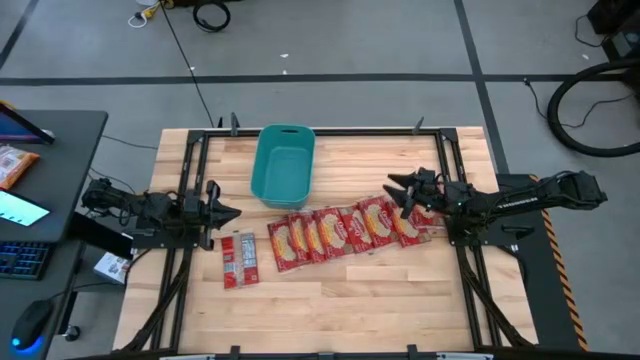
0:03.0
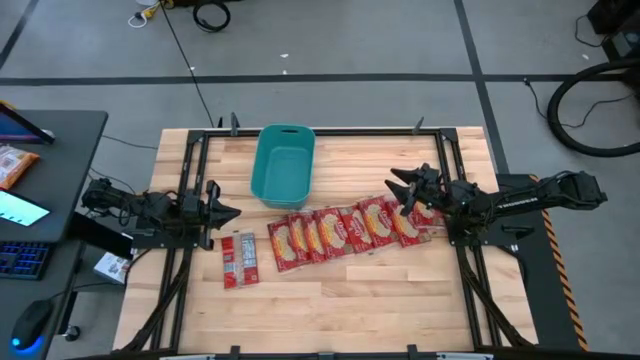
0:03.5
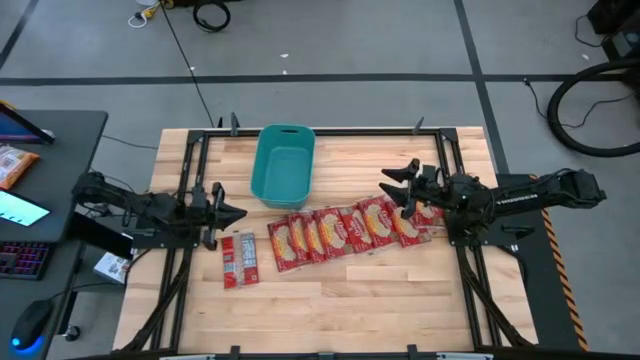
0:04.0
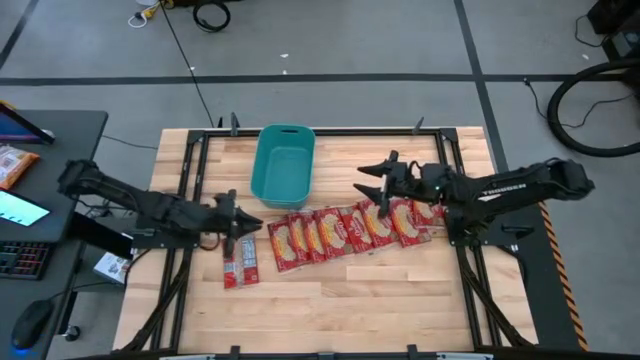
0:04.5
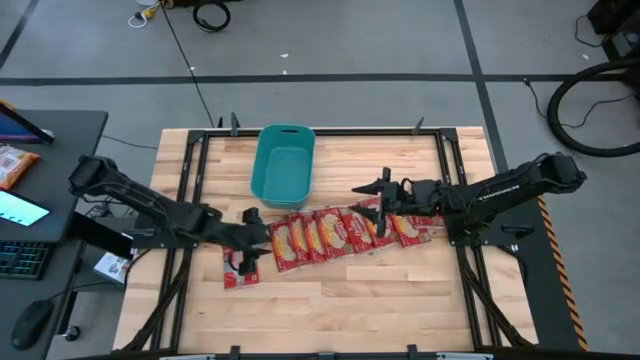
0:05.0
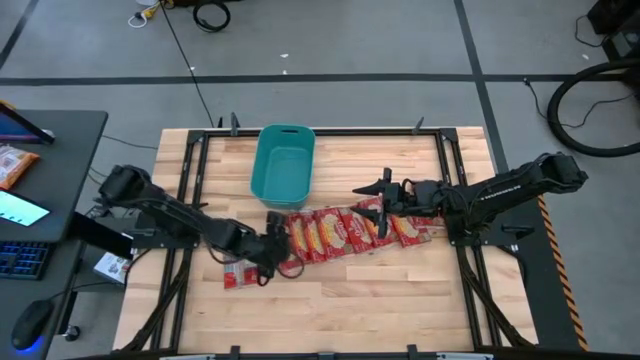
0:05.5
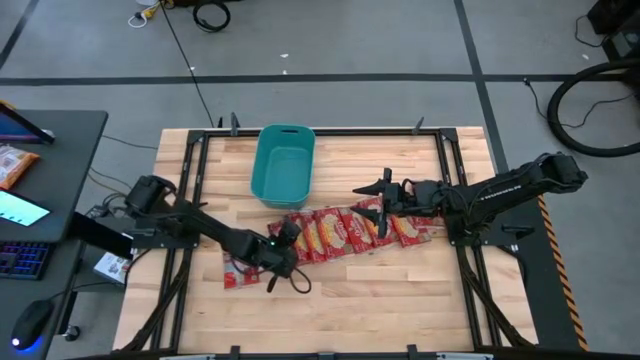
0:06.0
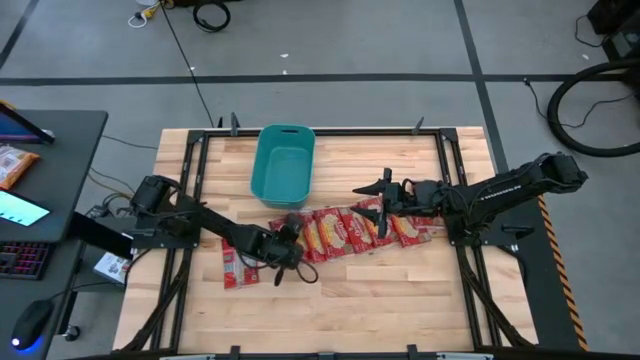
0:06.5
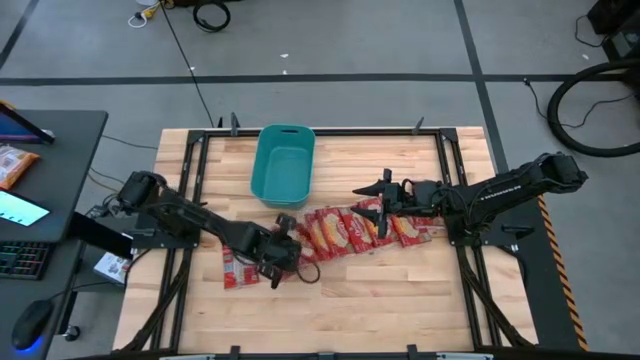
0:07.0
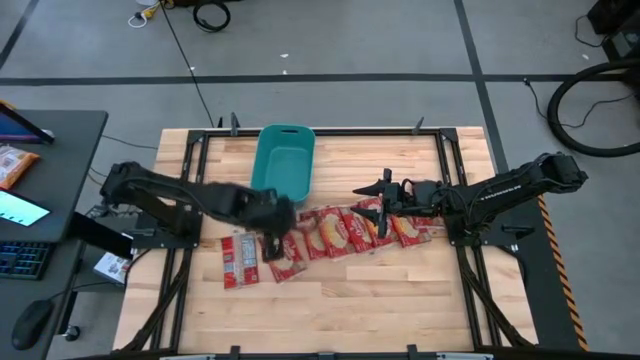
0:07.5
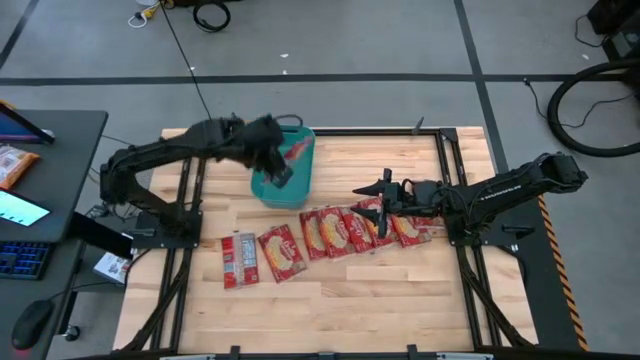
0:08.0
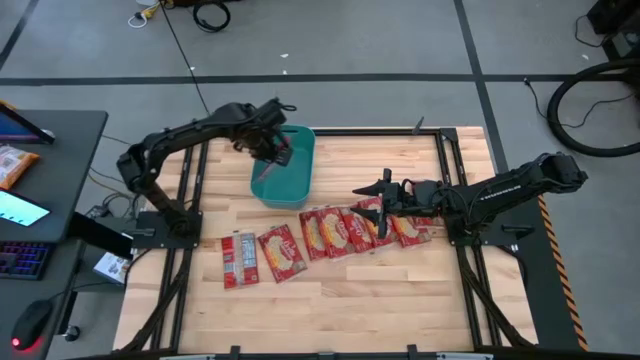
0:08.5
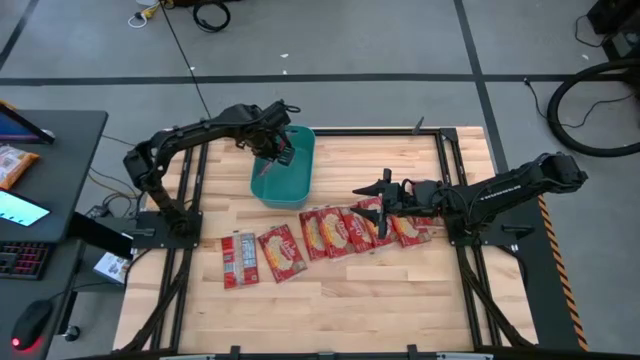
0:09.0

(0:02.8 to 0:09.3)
Task: Sort popcorn bags into baskets
Put the red popcorn bag into the green bin

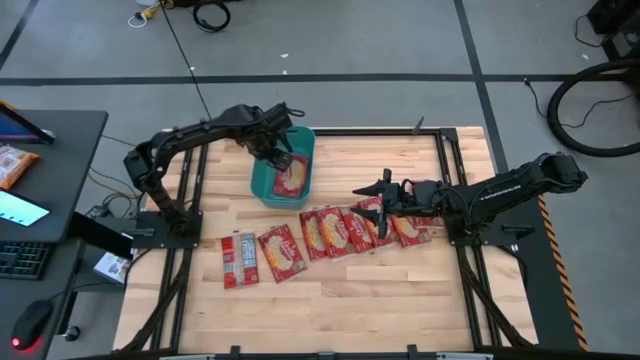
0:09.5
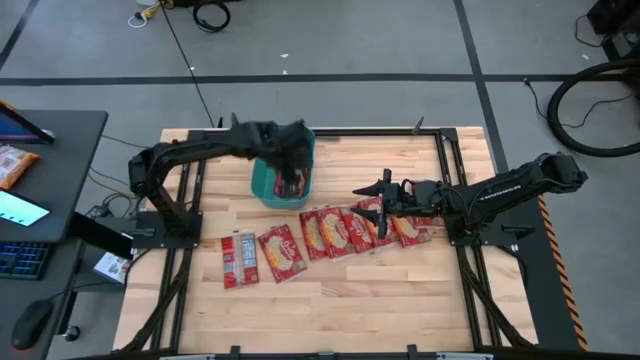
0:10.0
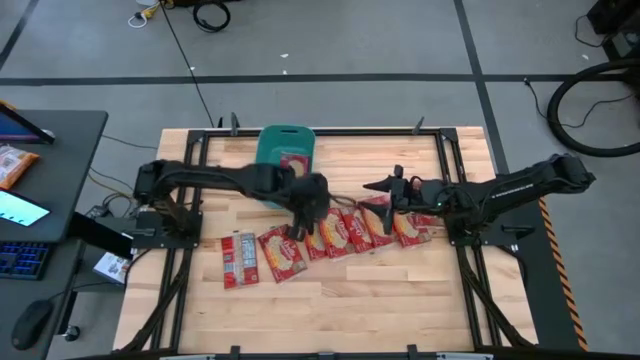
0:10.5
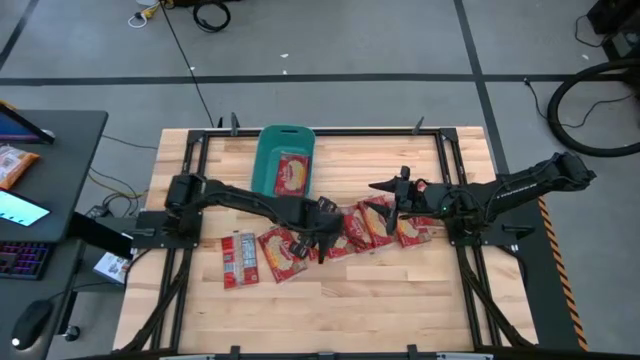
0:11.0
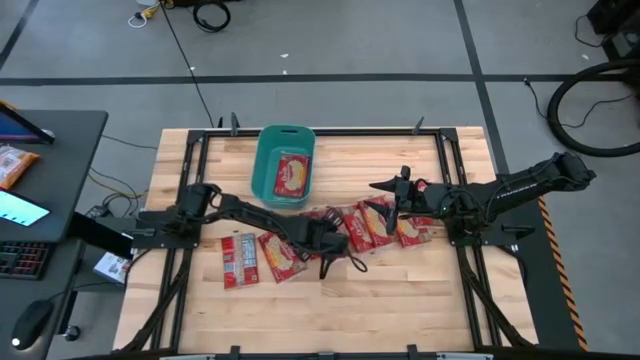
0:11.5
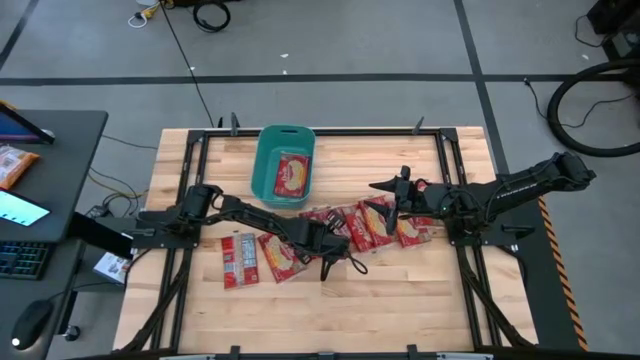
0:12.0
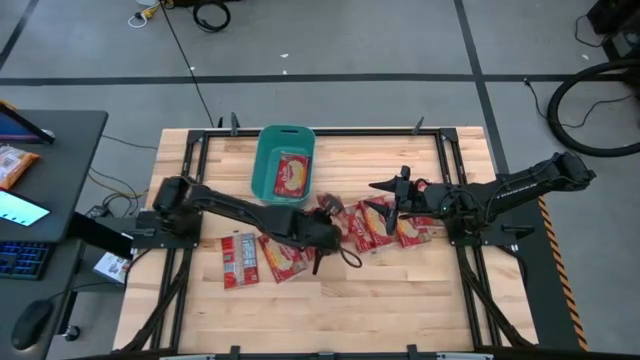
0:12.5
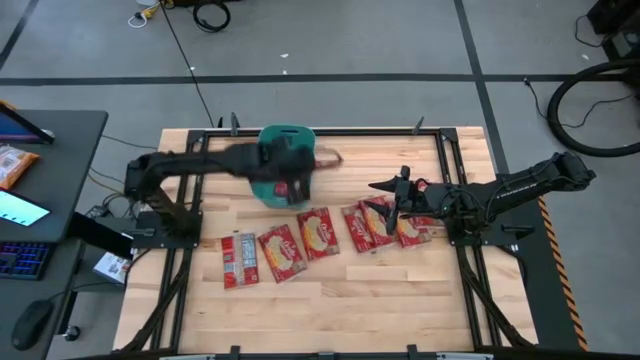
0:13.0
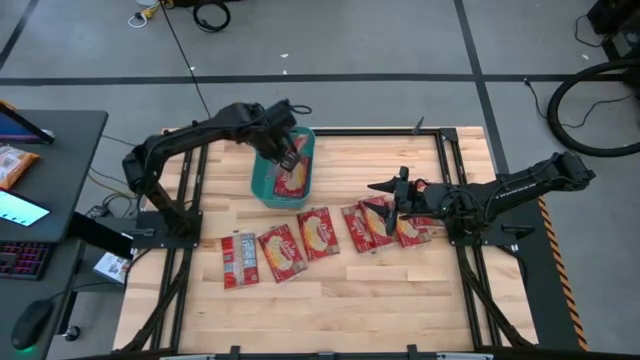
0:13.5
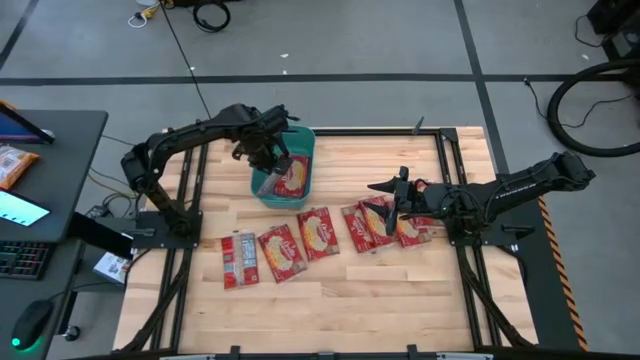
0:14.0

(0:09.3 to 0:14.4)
Put the red popcorn bag into the green bin

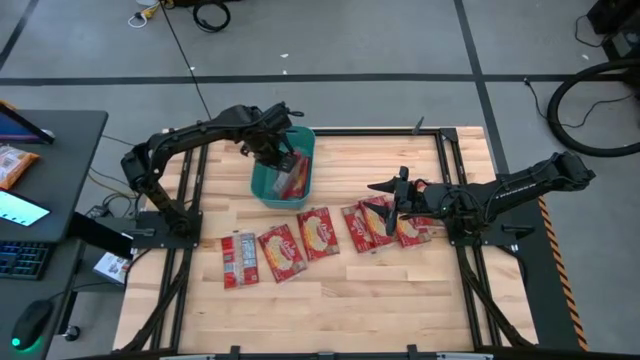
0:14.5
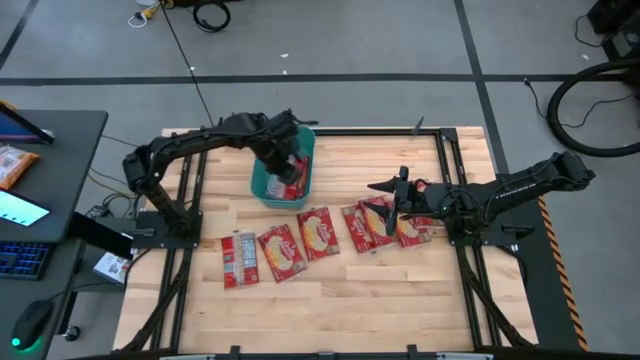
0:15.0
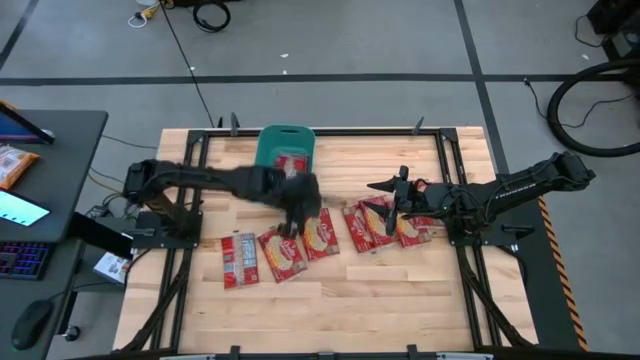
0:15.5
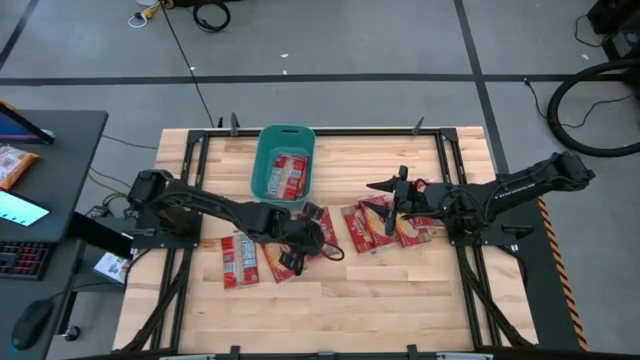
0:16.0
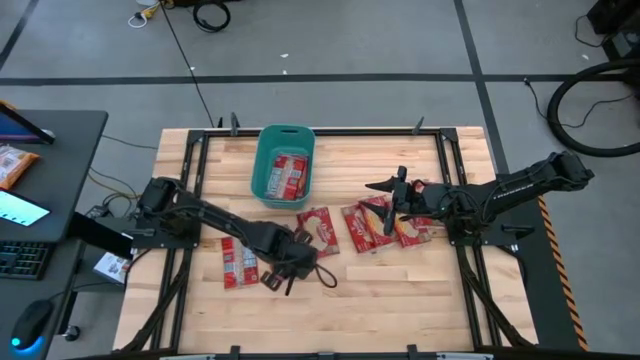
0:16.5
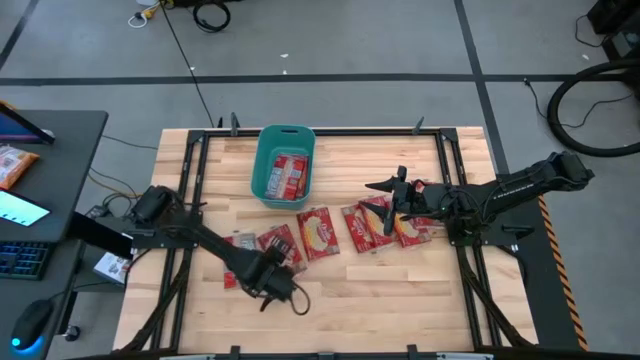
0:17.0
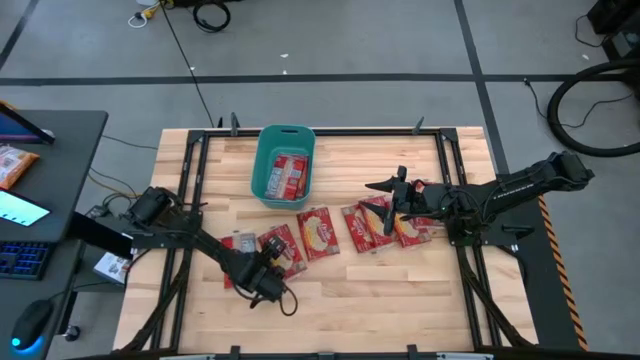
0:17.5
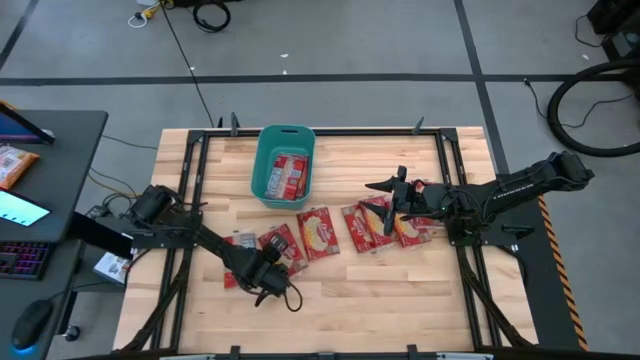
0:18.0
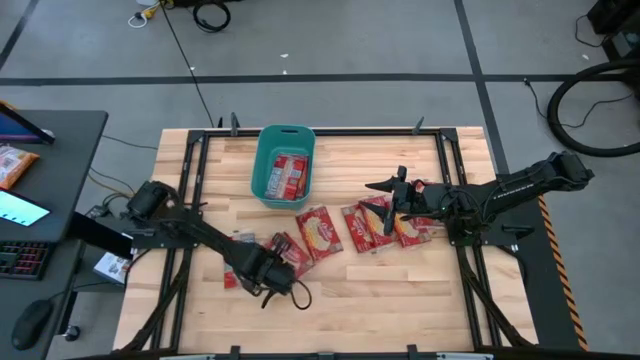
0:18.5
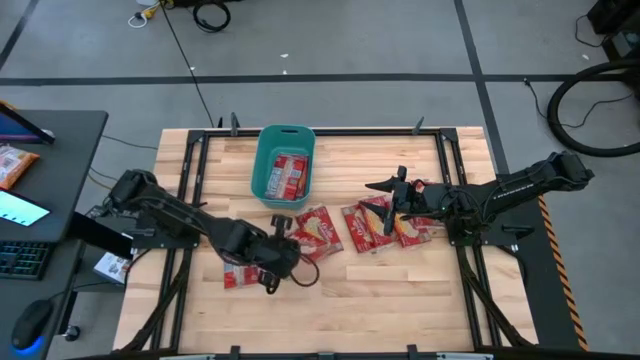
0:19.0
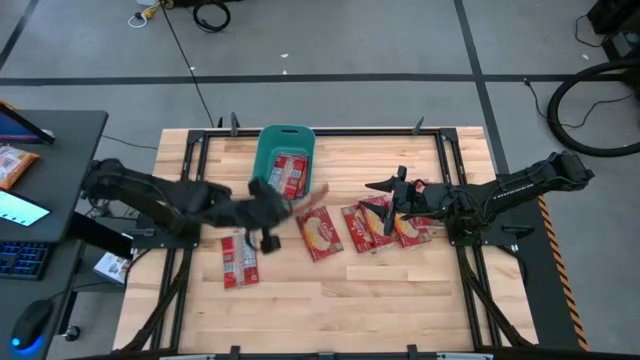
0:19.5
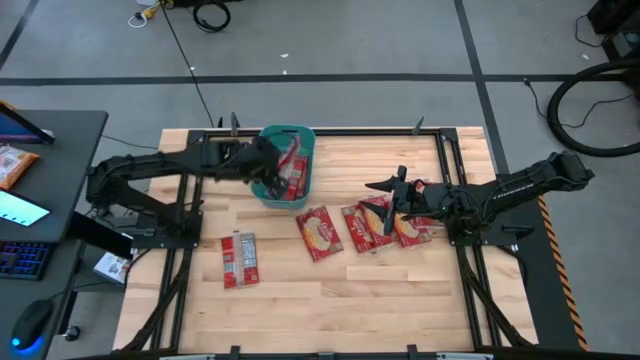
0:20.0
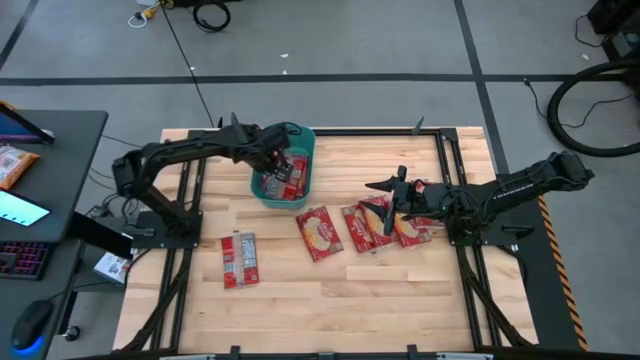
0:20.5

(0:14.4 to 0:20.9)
Put the red popcorn bag into the green bin

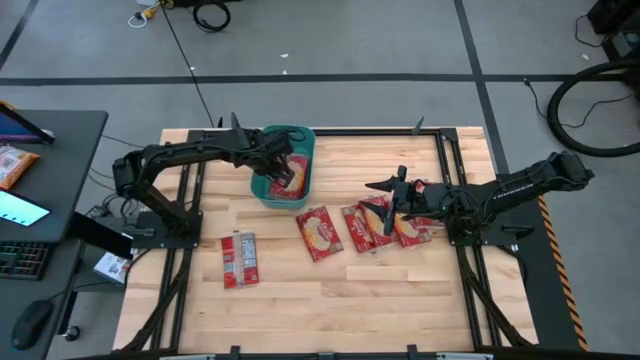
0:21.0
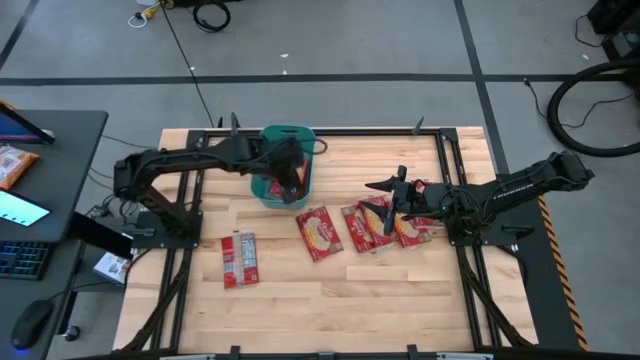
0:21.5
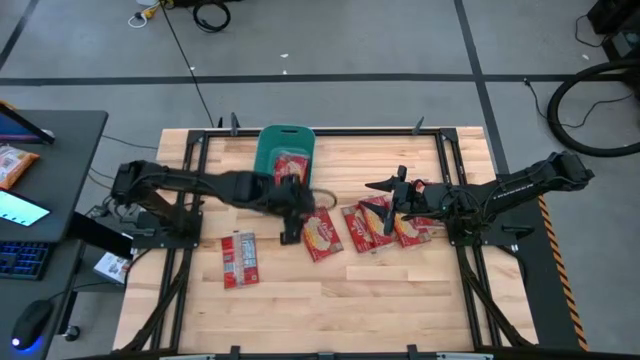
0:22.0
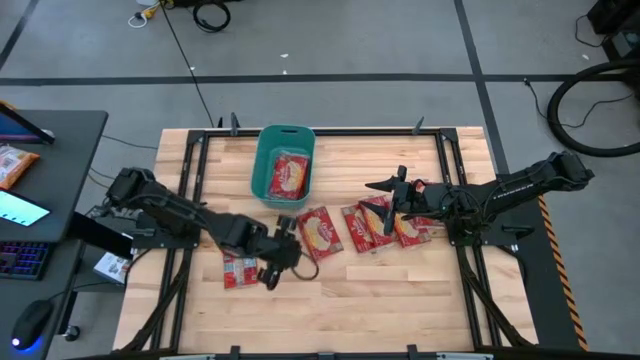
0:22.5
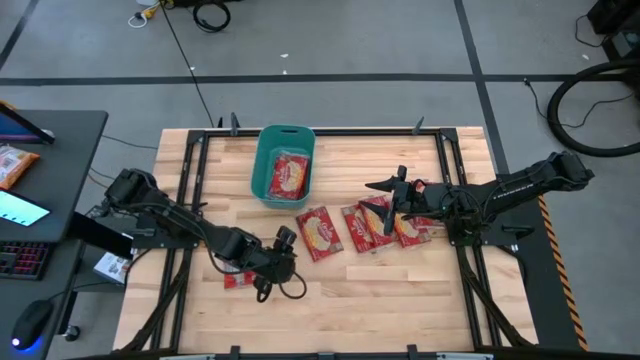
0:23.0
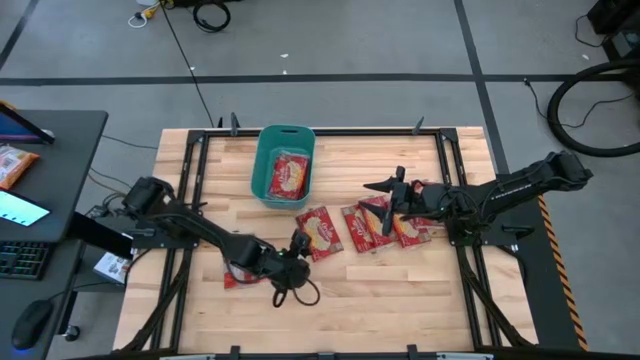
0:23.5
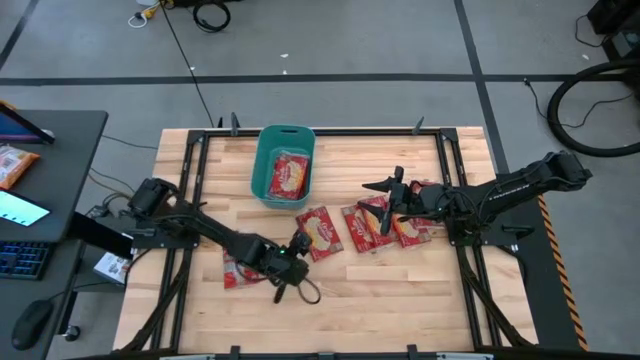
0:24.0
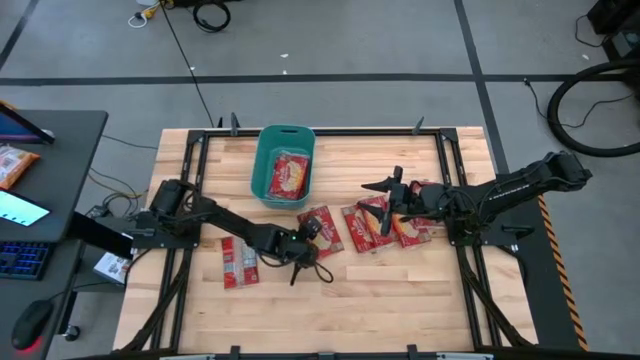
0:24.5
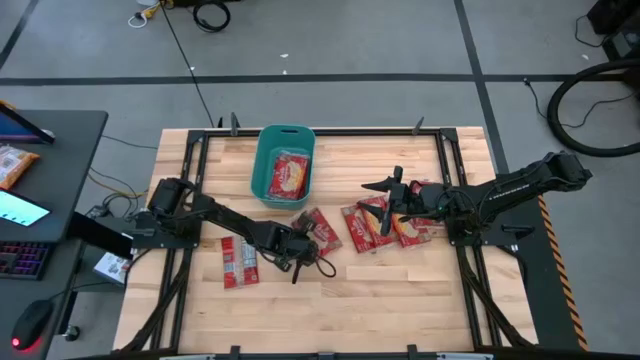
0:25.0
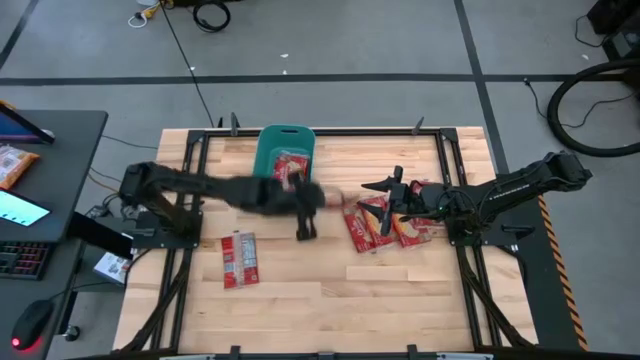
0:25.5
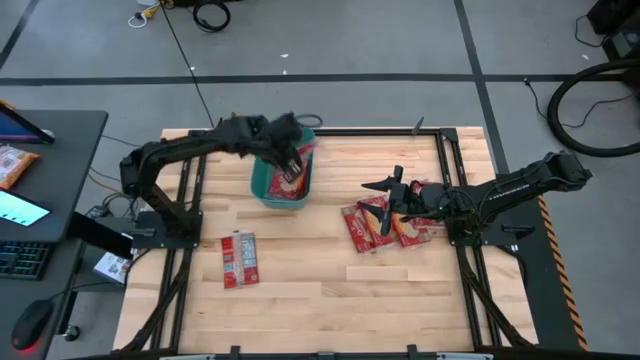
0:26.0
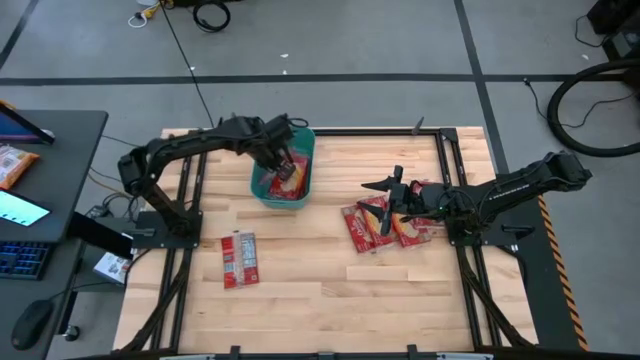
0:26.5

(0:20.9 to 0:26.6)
Put the red popcorn bag into the green bin
